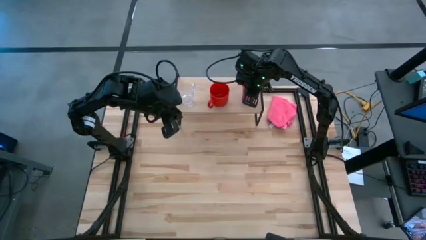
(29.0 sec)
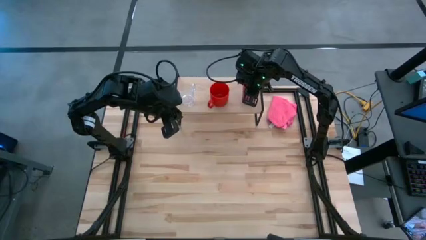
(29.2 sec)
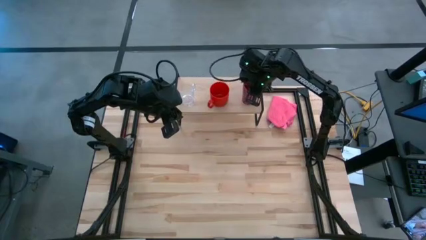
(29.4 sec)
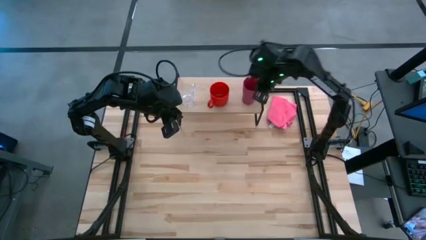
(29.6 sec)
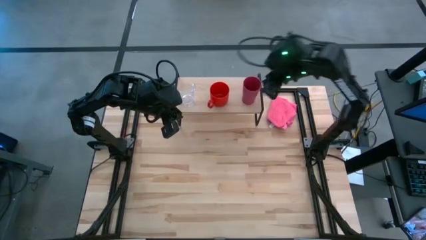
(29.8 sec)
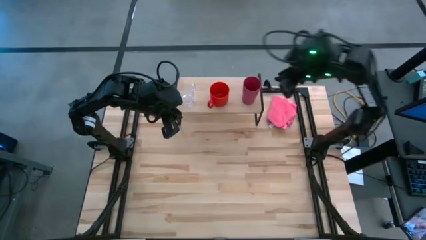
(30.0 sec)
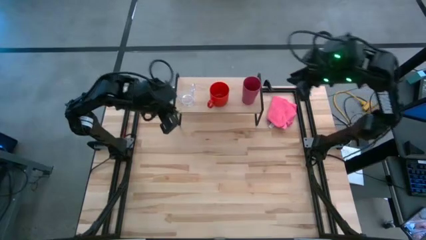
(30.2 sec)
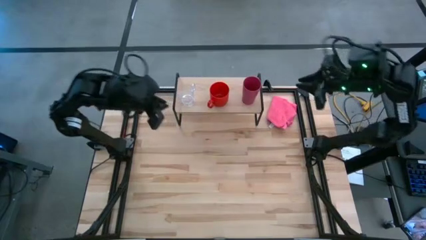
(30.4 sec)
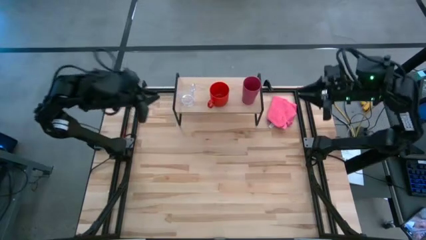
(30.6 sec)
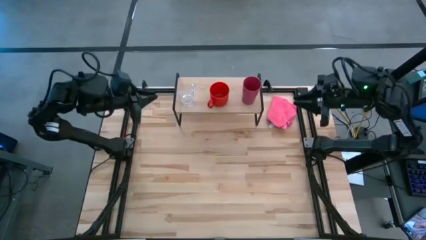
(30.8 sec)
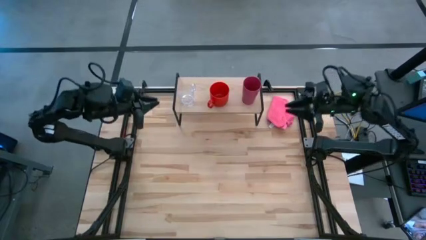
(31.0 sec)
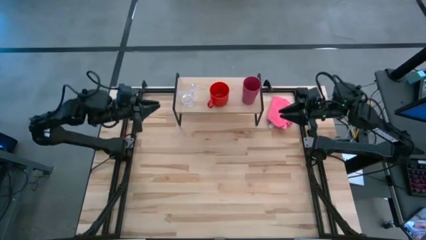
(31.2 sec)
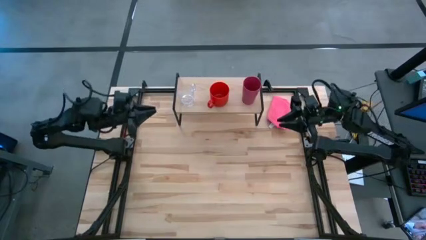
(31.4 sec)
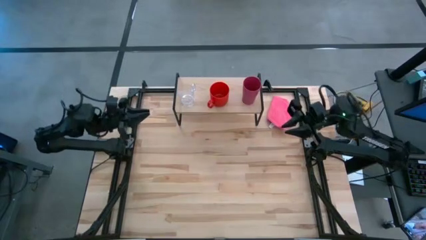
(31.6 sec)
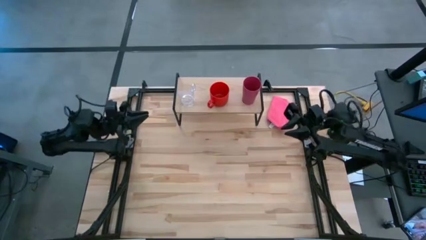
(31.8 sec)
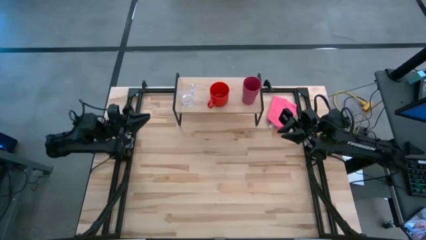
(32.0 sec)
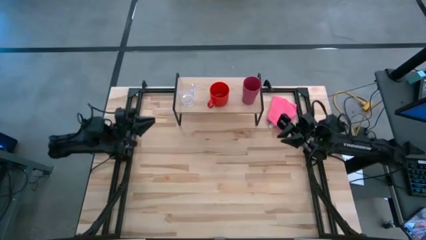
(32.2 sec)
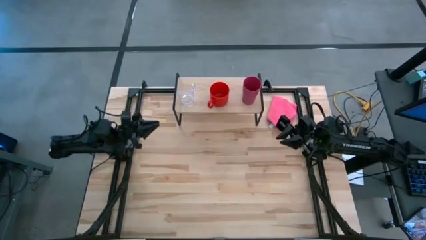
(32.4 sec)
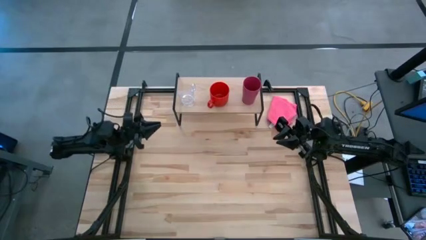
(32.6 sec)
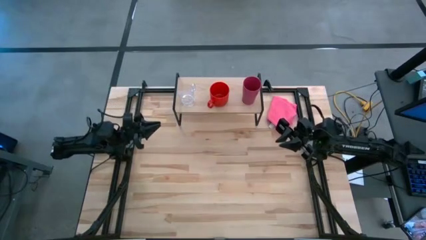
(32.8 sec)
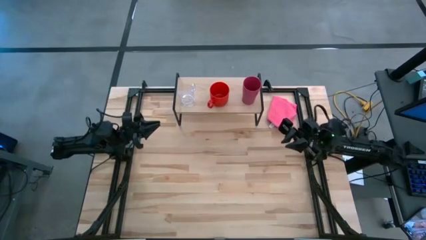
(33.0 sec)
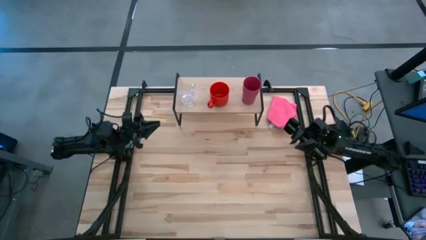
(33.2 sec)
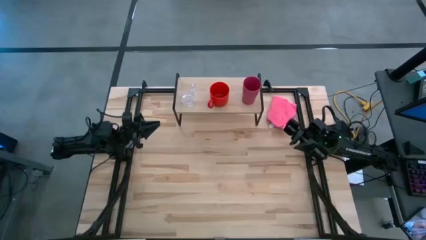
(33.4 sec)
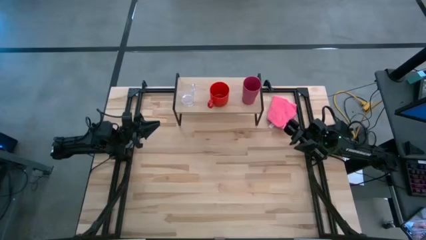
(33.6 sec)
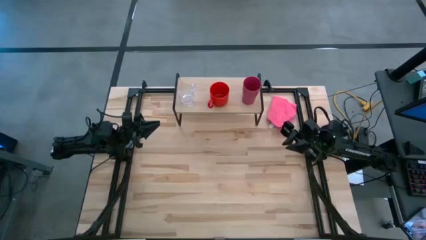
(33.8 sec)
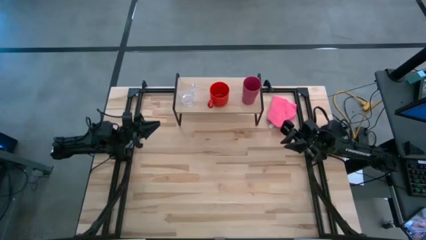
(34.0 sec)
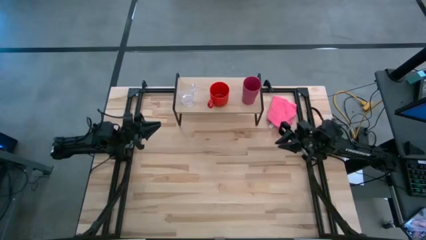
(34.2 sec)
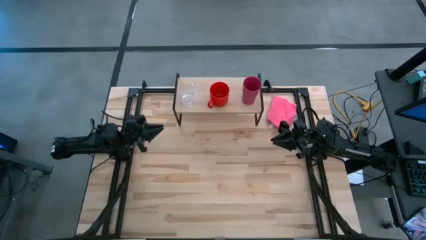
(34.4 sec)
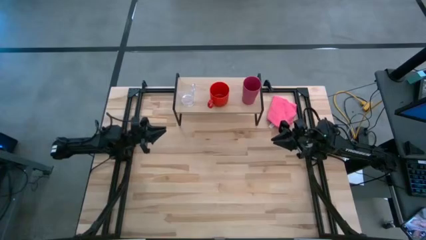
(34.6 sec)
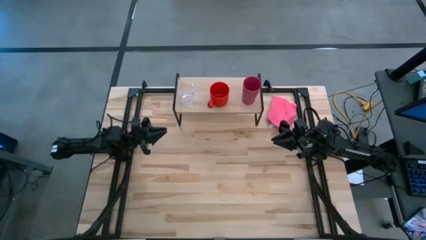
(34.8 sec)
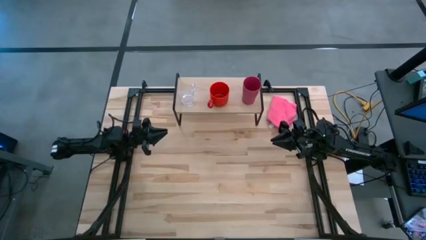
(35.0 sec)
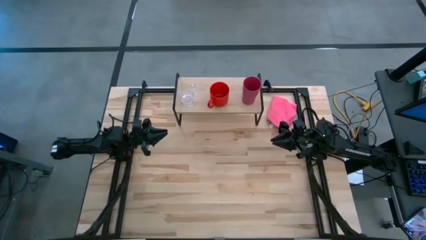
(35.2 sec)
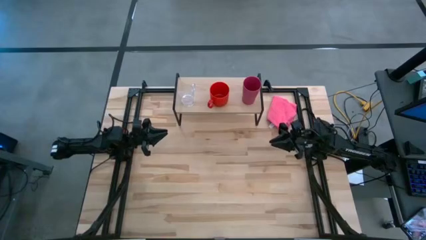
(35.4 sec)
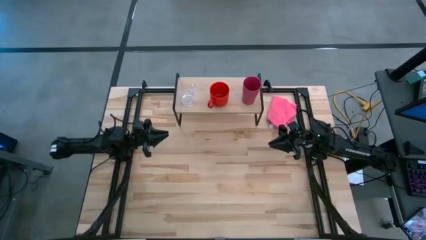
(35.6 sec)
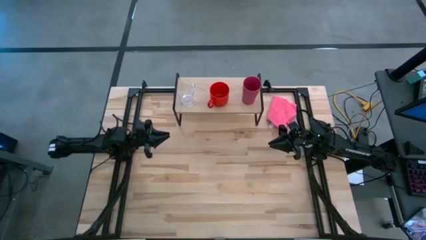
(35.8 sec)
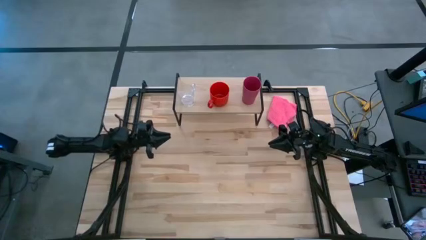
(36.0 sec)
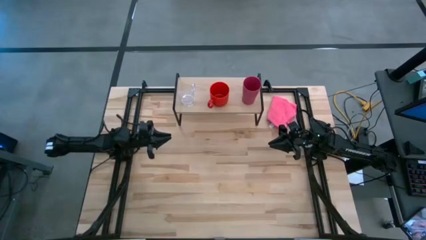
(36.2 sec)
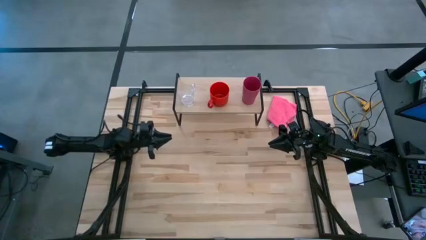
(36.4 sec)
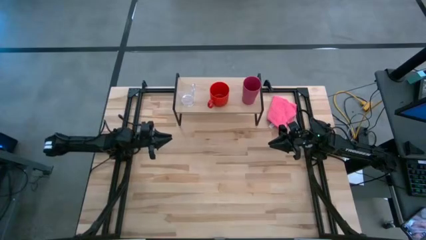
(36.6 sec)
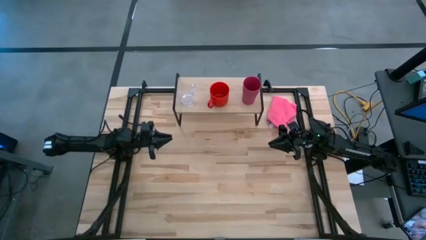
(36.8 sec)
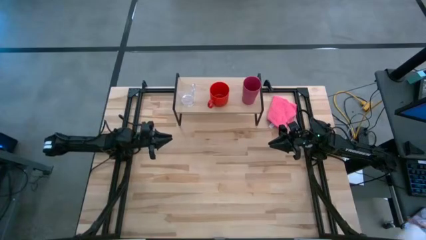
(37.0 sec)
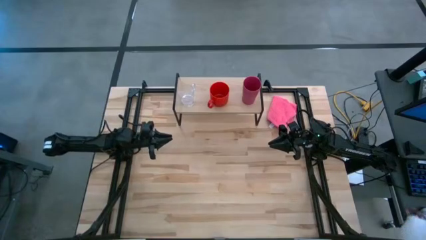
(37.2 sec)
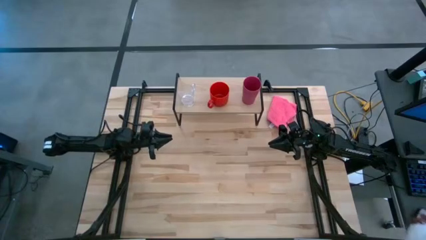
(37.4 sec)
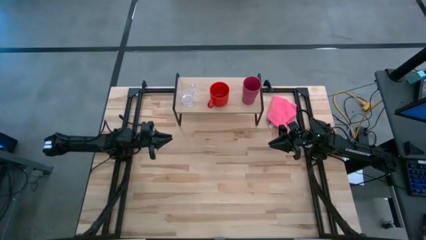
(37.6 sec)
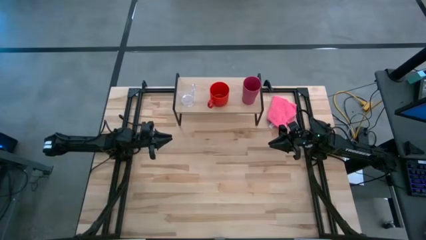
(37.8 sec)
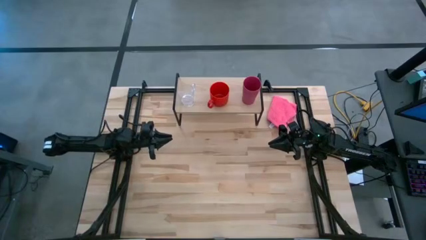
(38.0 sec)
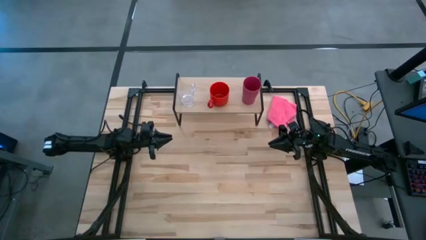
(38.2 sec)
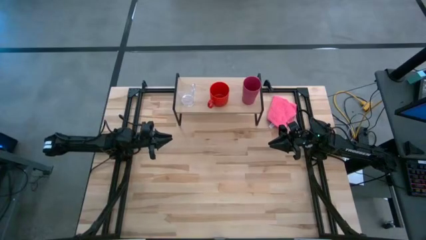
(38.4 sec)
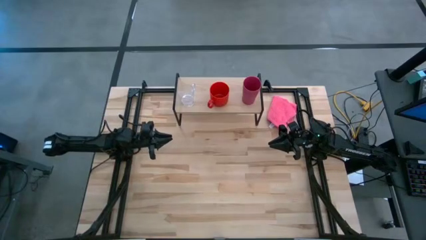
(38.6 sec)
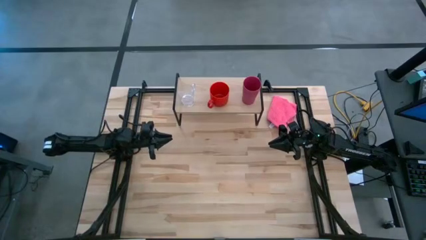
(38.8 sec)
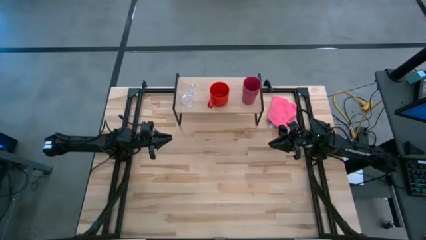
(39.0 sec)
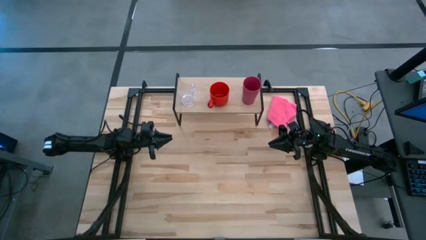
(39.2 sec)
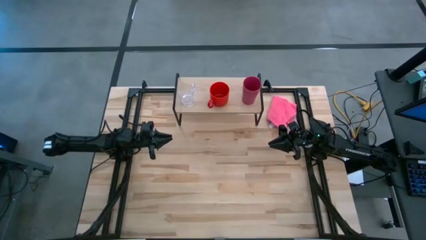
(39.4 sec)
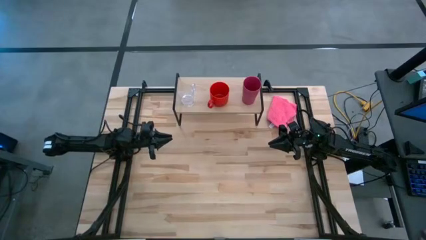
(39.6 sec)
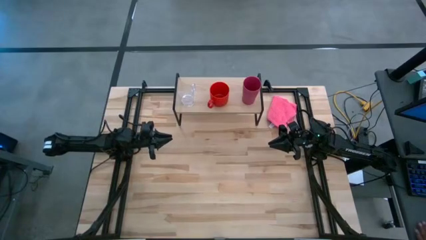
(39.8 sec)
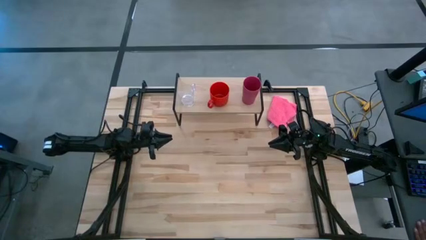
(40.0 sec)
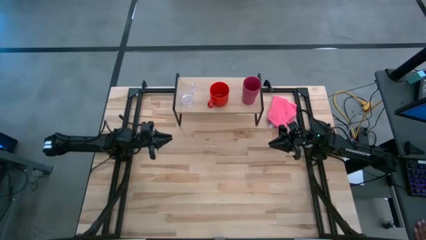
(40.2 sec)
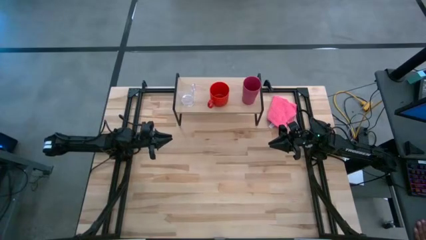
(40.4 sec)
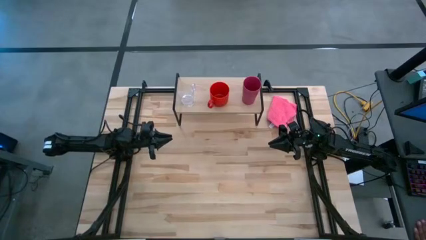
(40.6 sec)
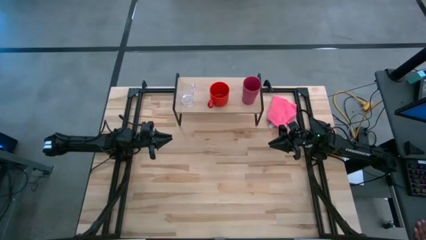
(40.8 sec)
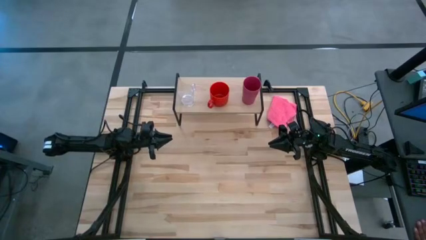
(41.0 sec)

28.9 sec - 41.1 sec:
Task: Stack small to large cups/mugs on shelf
Return to Home Position
